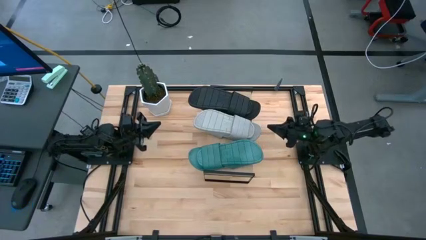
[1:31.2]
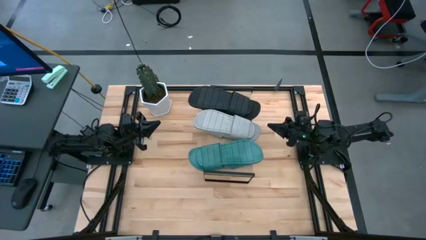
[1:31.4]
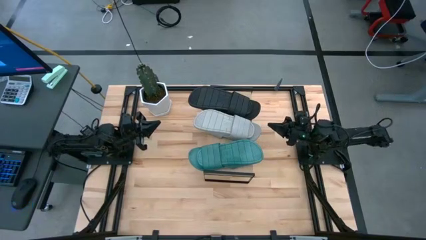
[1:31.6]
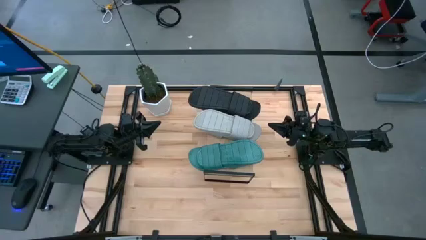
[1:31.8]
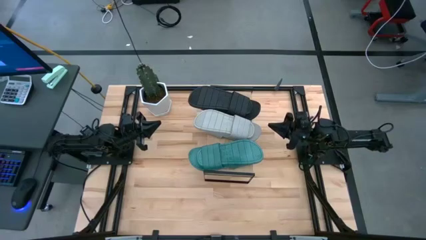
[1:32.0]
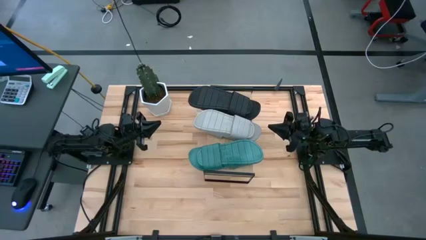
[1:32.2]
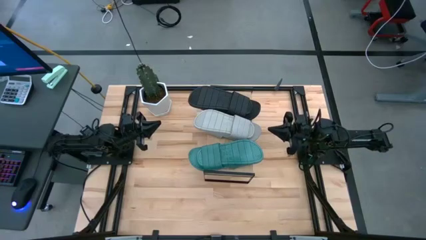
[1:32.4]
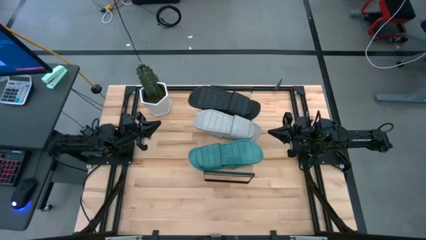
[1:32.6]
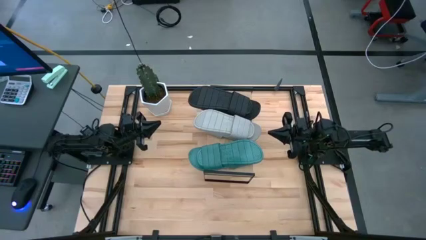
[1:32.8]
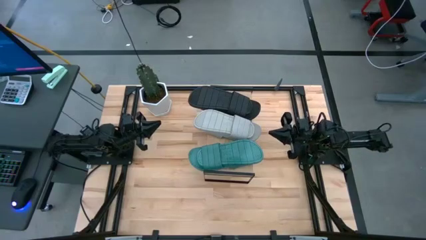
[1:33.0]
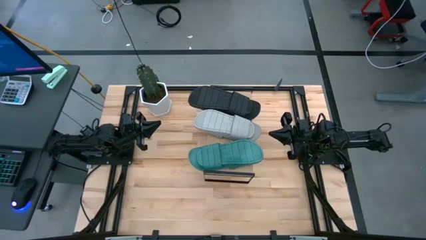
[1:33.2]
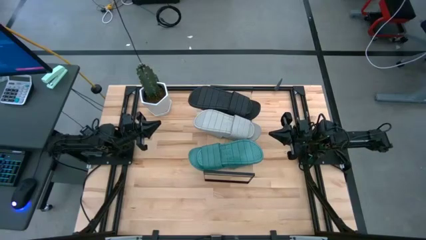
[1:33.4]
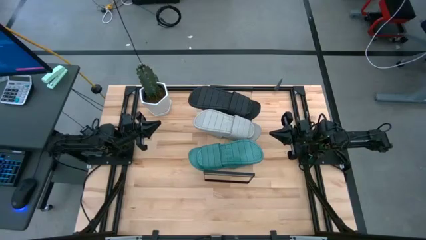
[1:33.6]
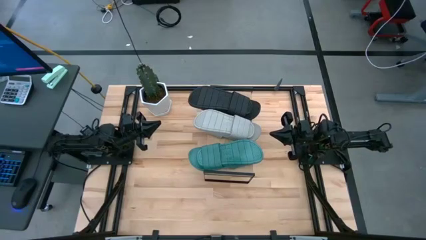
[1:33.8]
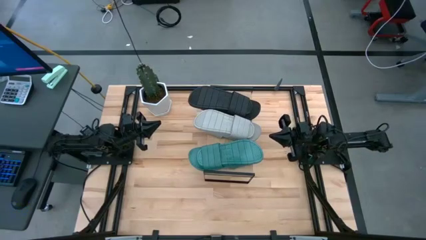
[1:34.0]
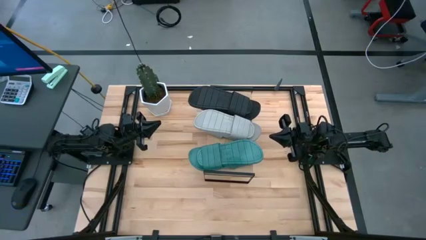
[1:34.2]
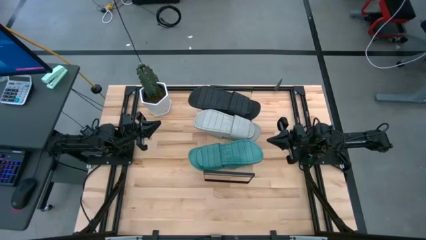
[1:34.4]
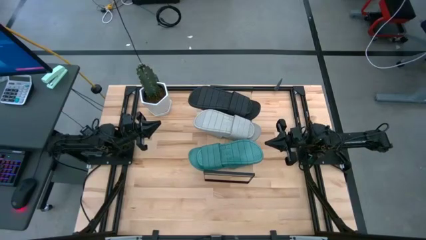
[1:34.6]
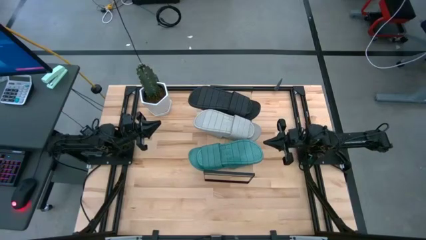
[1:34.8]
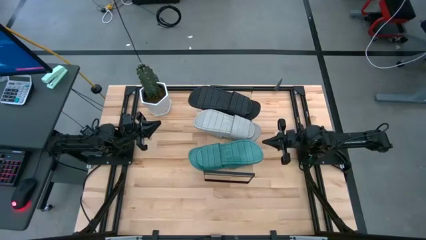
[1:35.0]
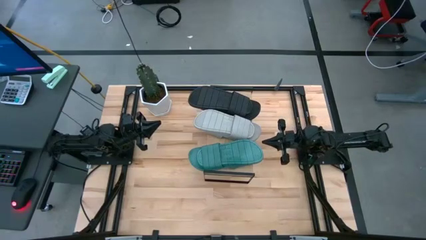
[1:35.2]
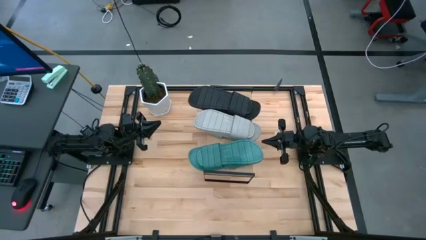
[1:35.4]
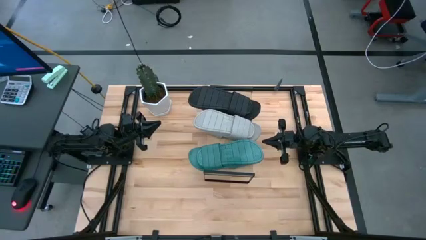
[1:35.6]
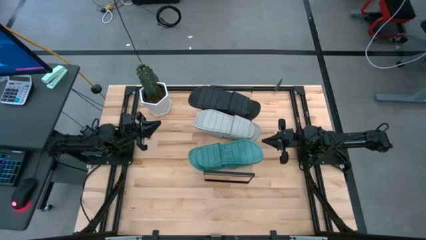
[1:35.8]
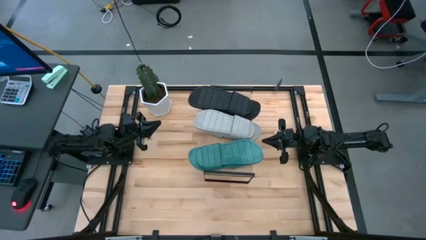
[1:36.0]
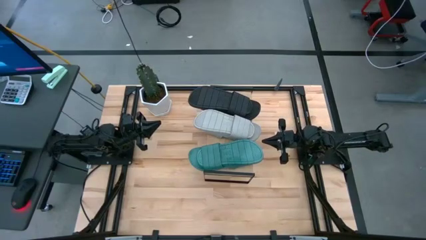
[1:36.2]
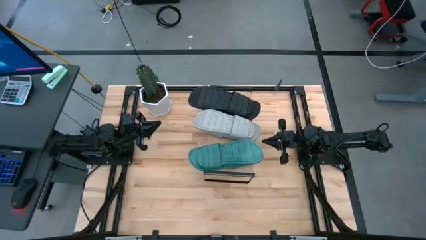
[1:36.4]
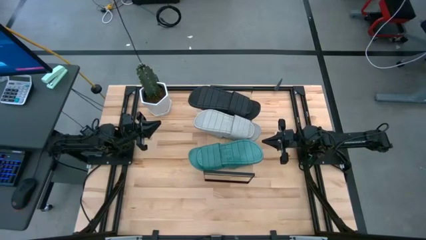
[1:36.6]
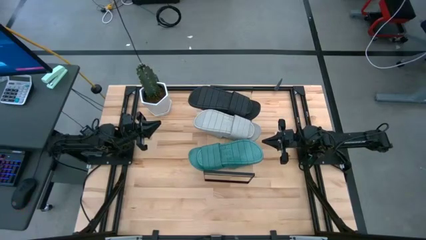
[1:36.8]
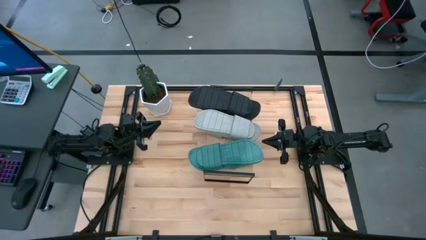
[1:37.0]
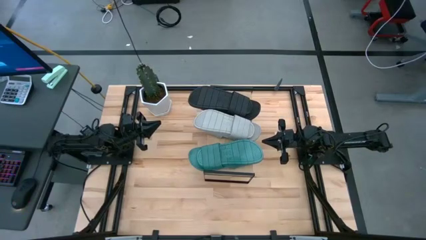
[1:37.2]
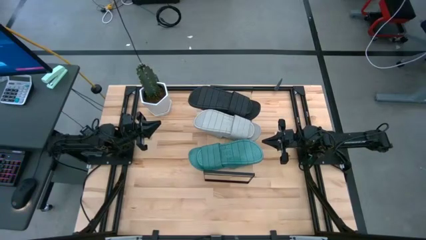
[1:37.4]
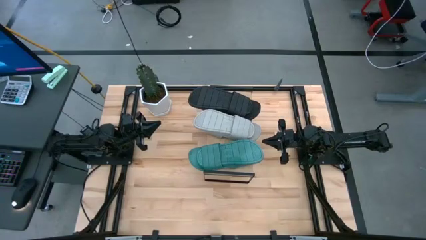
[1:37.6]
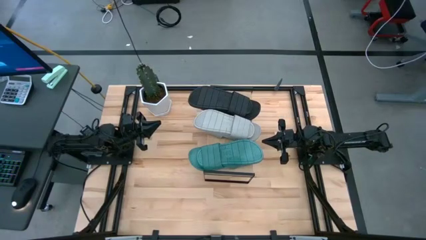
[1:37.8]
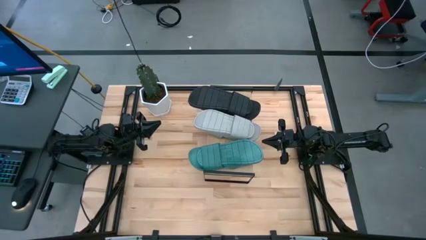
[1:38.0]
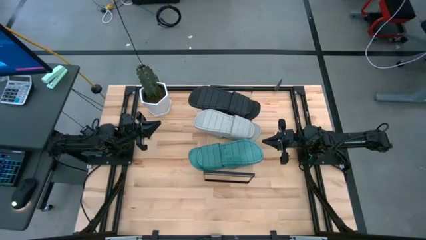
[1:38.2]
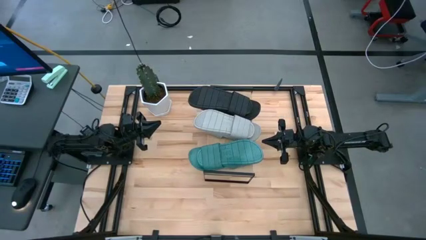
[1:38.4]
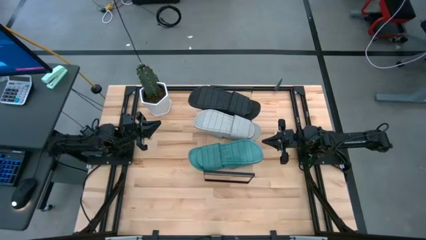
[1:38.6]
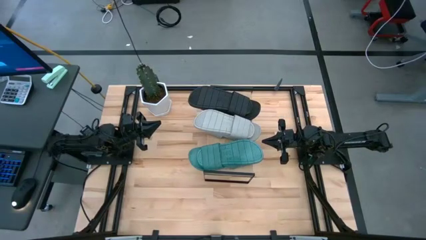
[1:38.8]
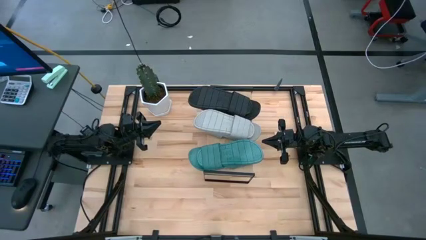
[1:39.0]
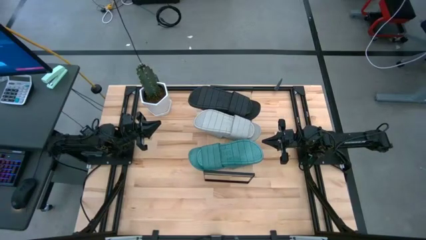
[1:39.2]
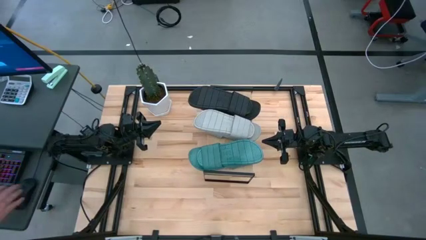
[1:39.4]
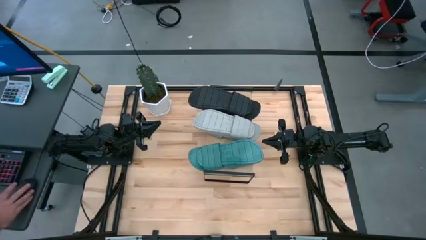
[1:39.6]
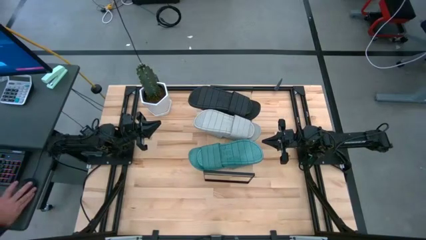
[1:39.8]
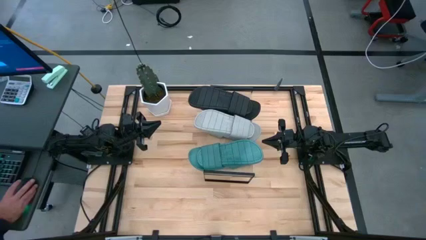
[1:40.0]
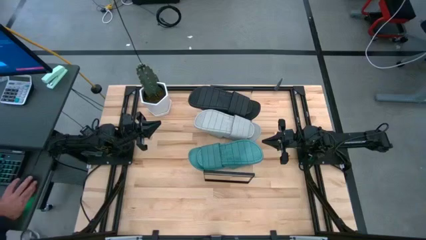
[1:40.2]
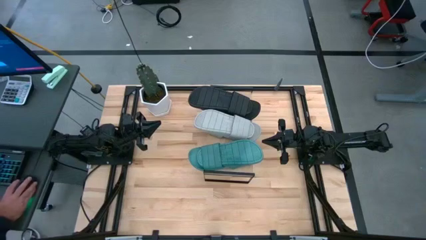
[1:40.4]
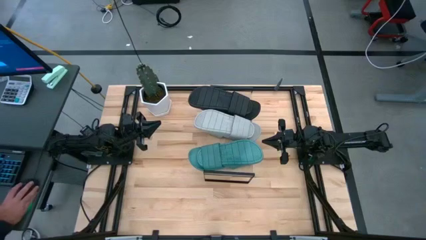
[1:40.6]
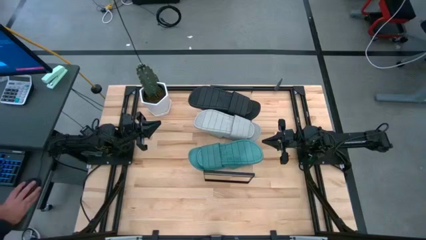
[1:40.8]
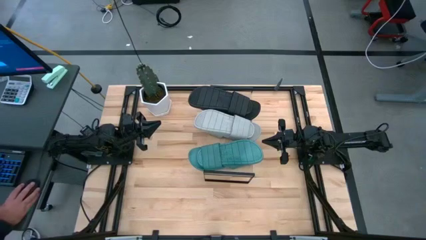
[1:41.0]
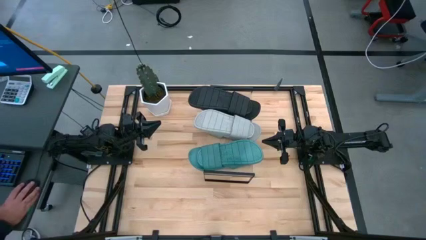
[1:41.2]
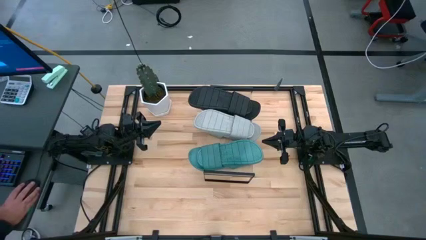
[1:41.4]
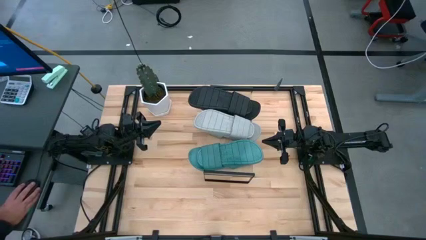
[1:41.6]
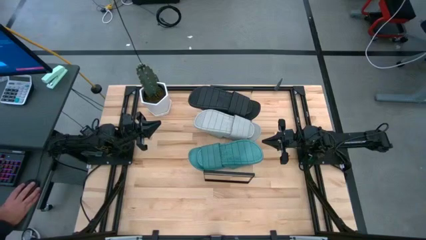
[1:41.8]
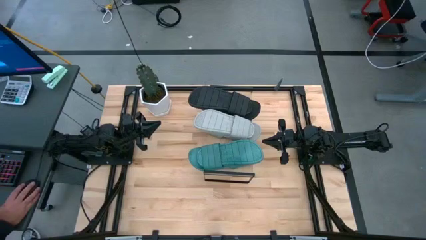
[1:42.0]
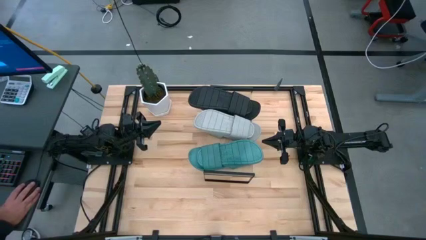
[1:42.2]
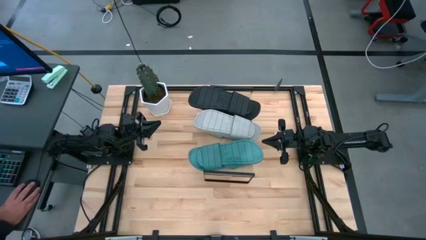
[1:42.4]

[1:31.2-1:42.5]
Task: Pick and place slides into the shelf
Return to Home Position

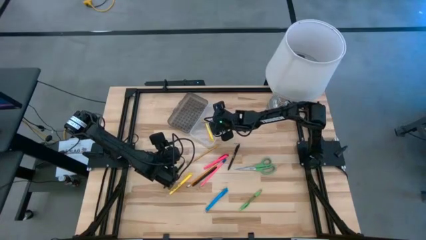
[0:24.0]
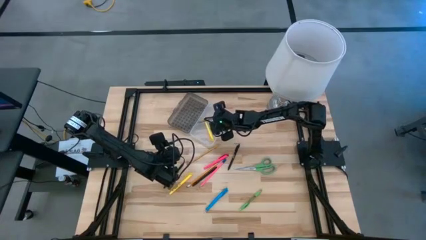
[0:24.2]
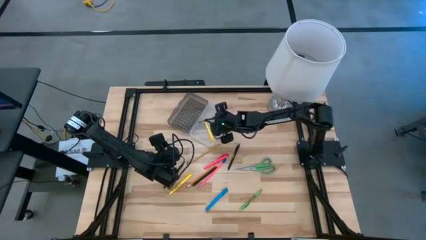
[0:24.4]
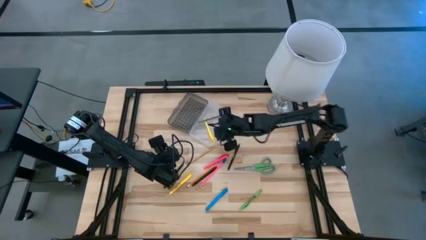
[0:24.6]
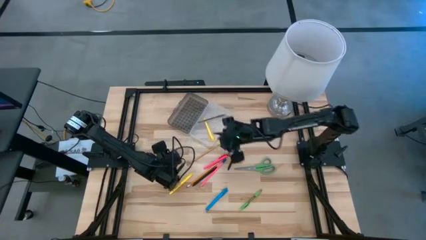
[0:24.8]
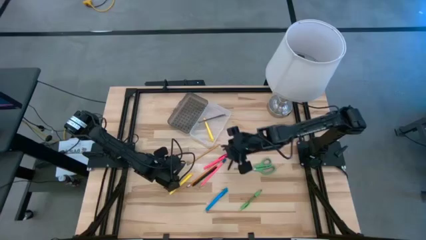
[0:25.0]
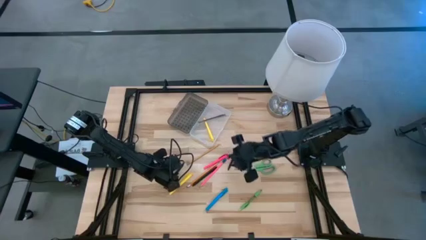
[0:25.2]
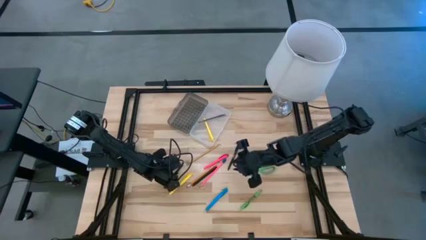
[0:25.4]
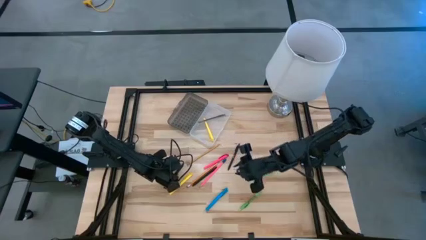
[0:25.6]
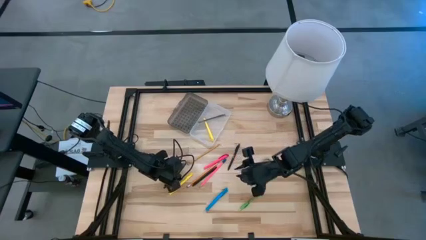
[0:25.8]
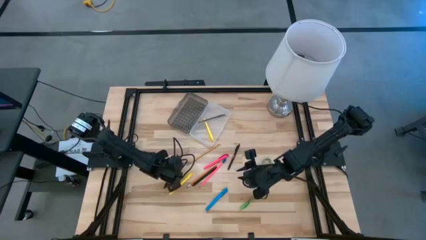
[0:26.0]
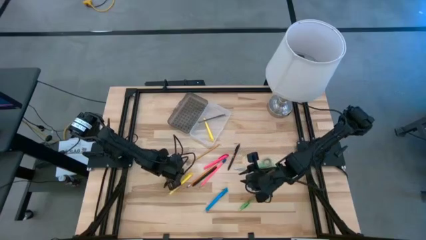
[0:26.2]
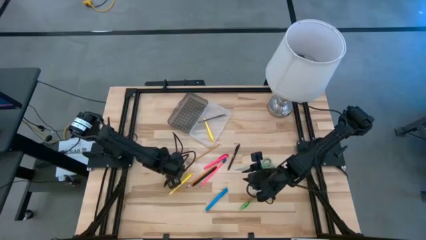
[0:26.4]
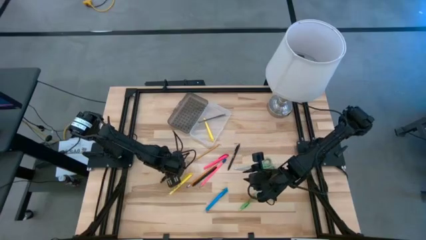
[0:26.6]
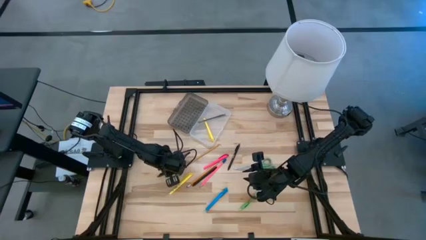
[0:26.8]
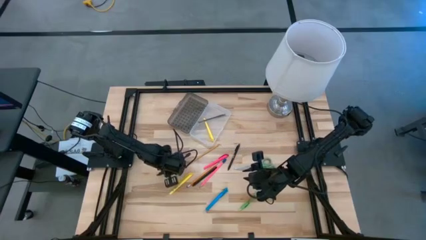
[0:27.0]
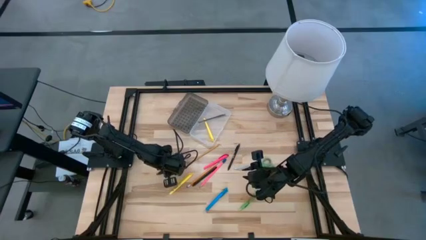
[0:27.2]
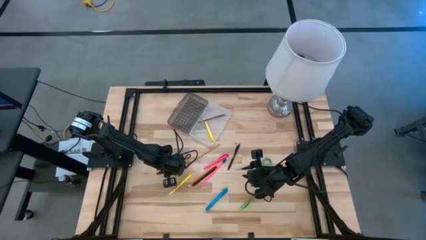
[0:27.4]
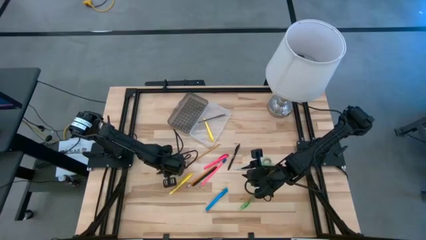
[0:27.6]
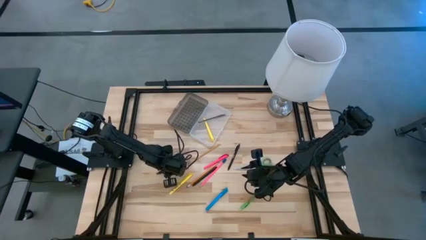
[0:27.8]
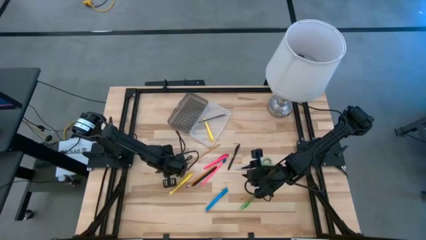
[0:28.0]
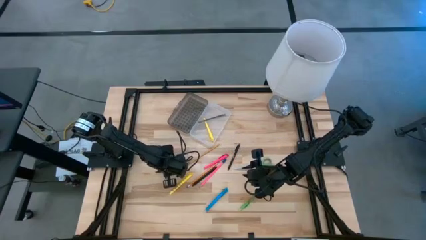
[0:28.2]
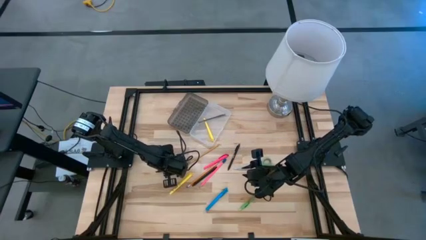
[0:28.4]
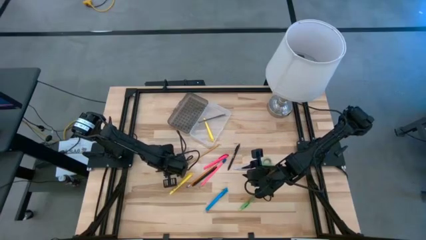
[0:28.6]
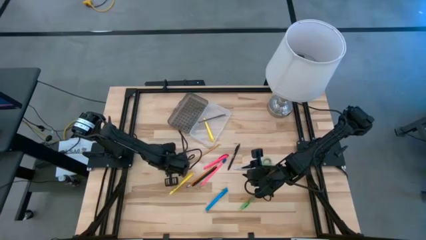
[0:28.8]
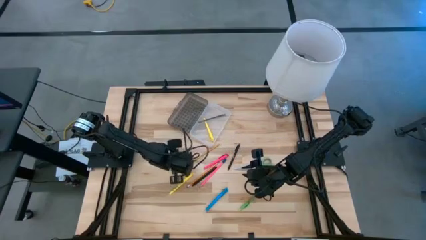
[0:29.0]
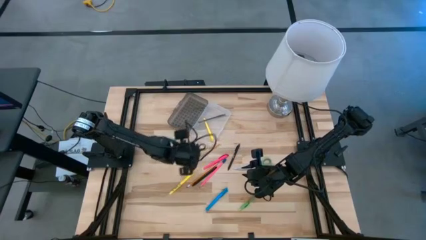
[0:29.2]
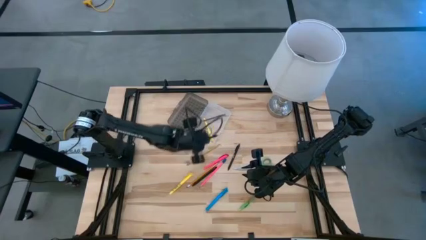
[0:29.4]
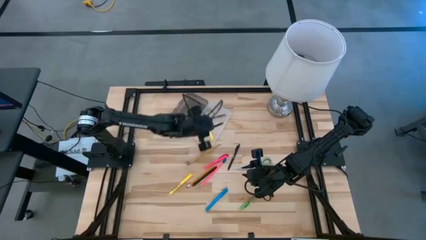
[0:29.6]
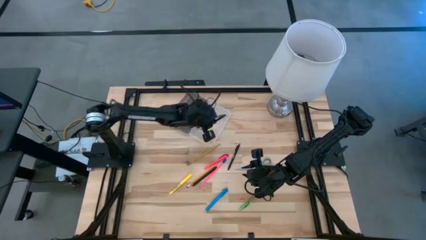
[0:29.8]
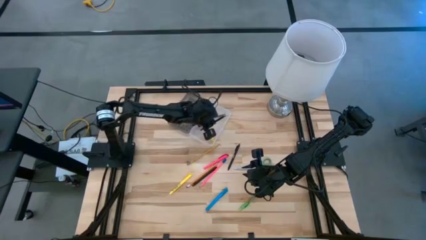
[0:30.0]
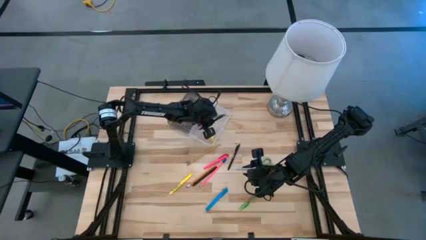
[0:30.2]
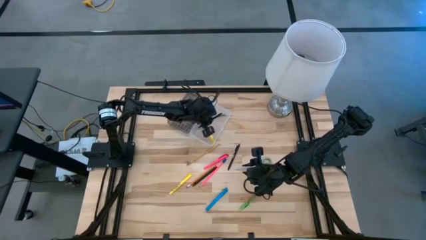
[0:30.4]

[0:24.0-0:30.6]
Task: Pick & place school supplies into a supply box
Put the black pen into the supply box
